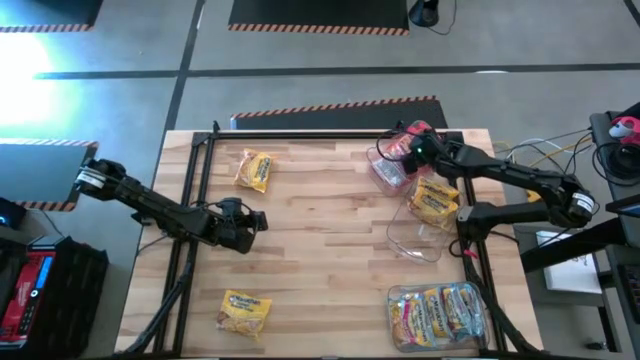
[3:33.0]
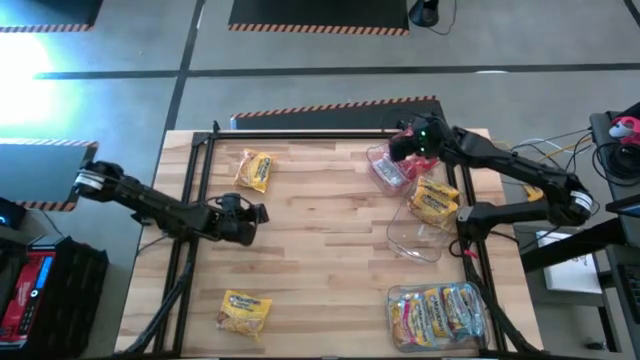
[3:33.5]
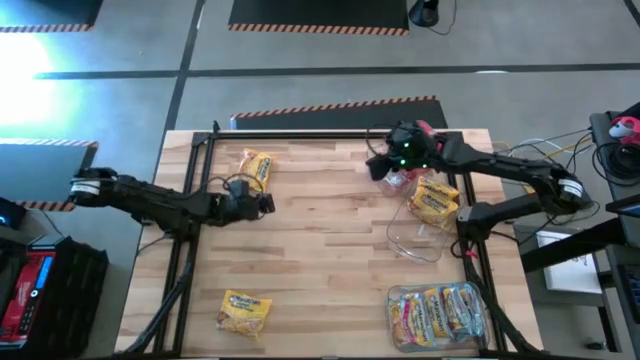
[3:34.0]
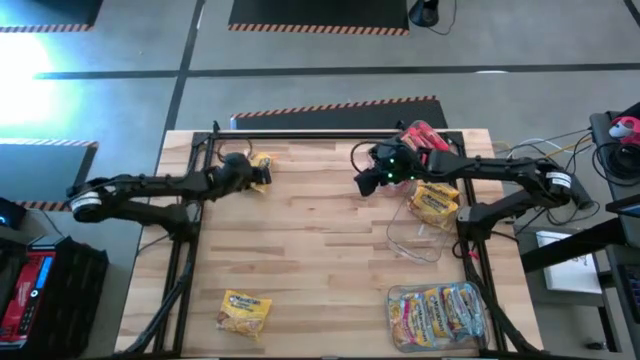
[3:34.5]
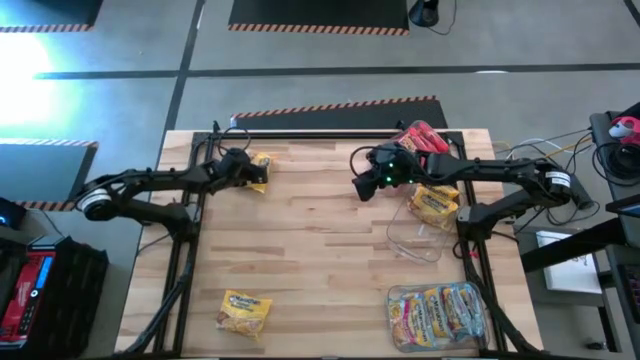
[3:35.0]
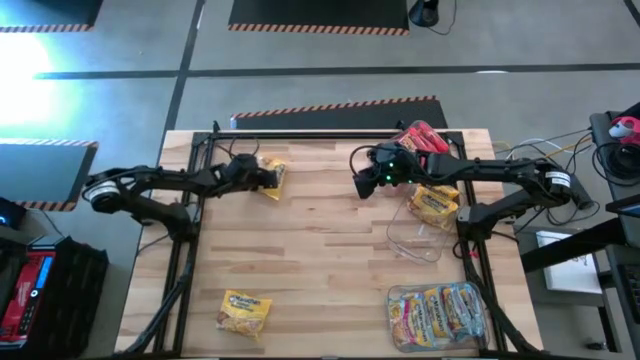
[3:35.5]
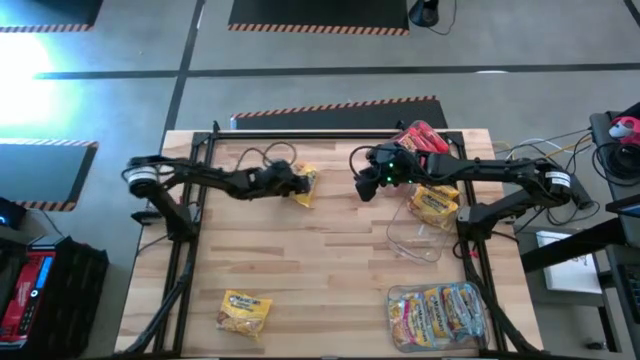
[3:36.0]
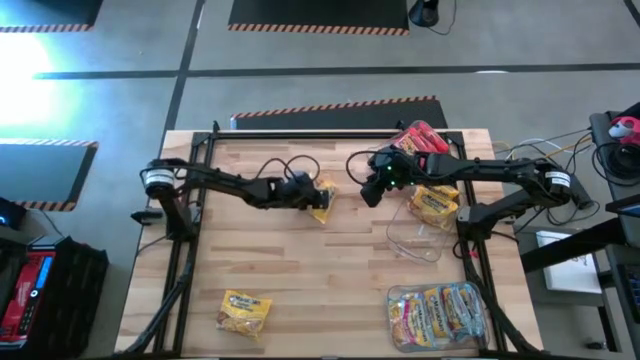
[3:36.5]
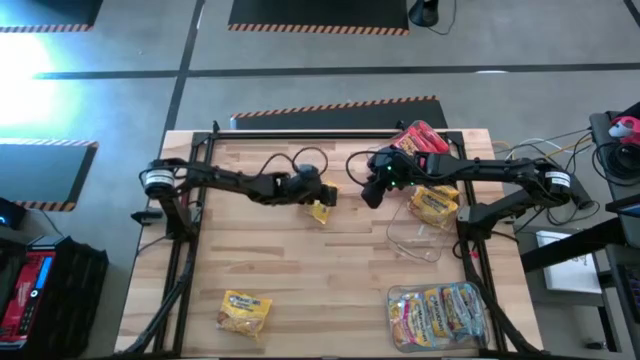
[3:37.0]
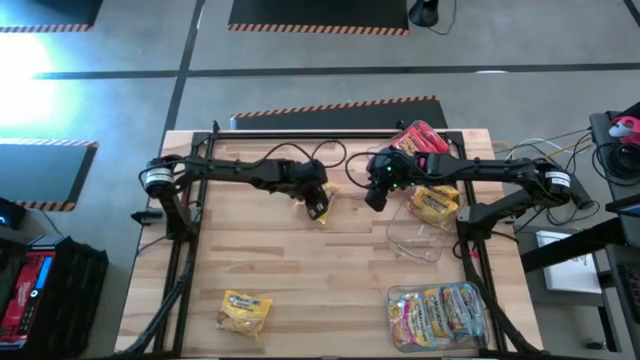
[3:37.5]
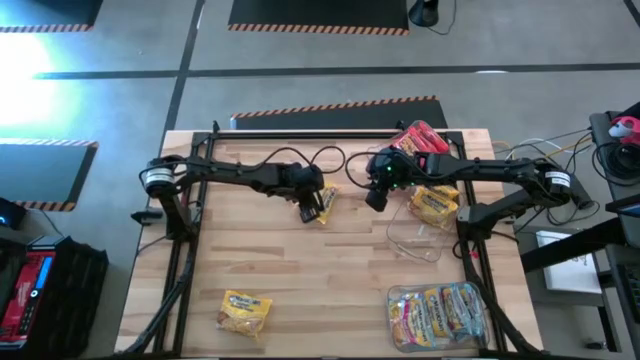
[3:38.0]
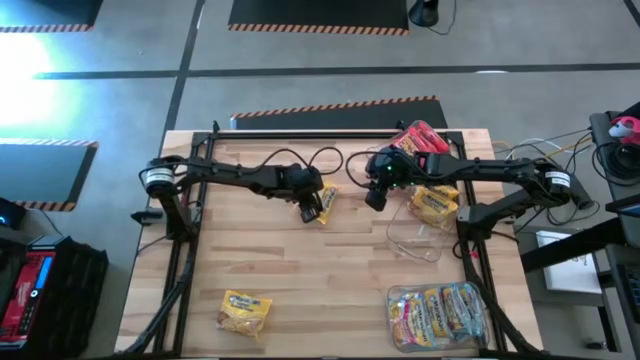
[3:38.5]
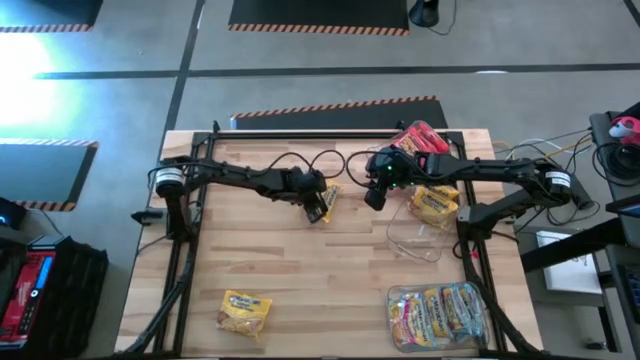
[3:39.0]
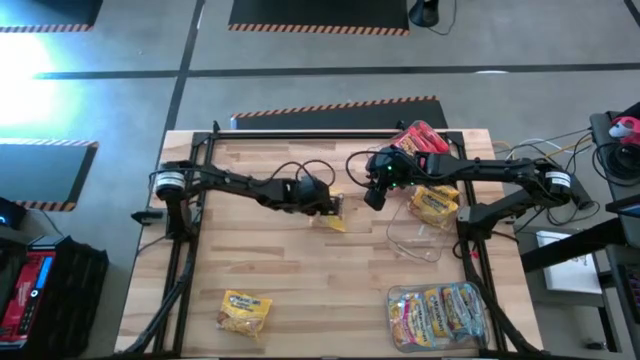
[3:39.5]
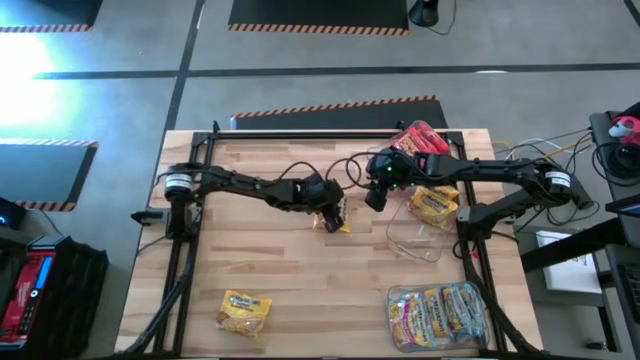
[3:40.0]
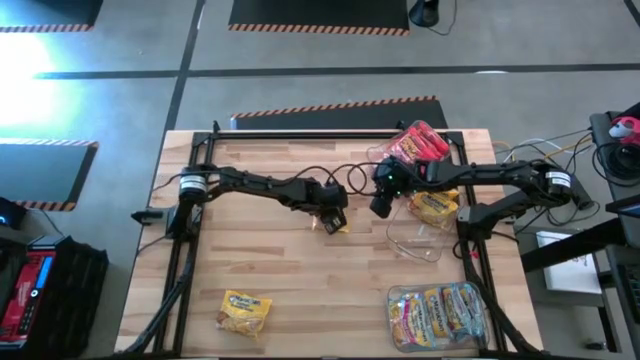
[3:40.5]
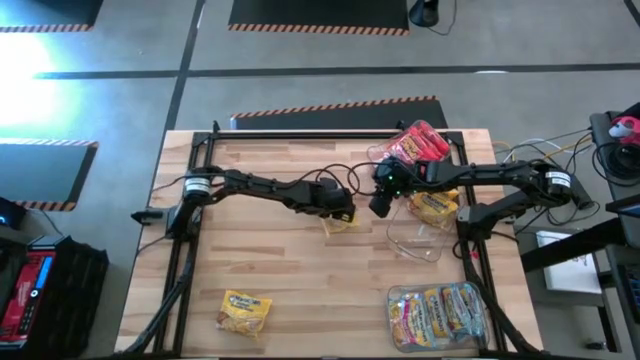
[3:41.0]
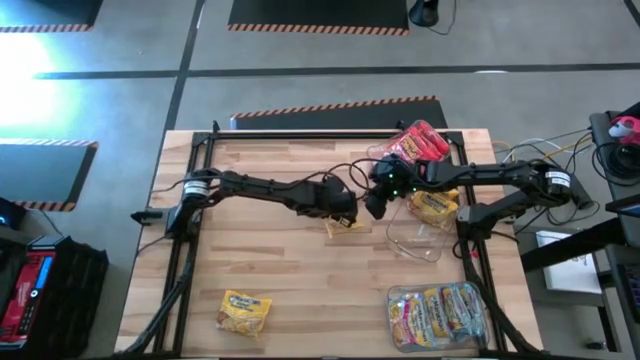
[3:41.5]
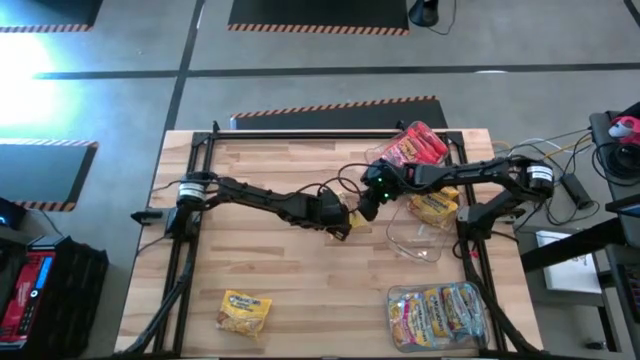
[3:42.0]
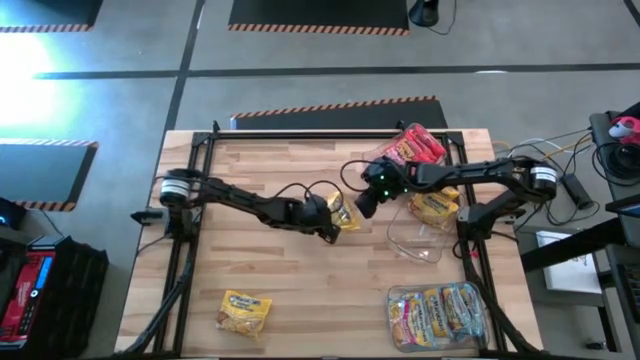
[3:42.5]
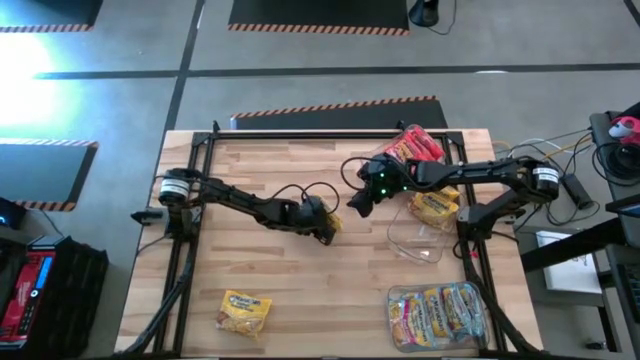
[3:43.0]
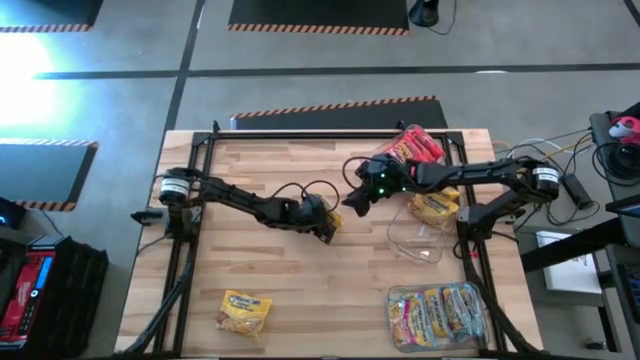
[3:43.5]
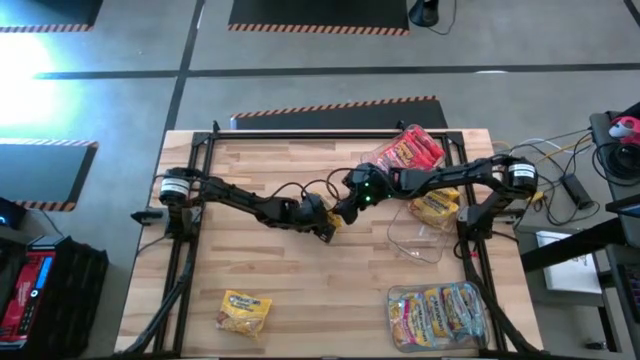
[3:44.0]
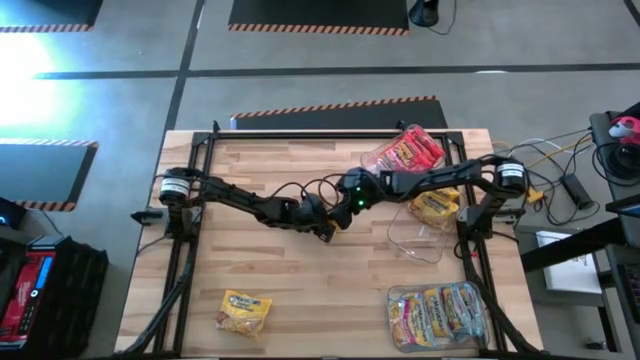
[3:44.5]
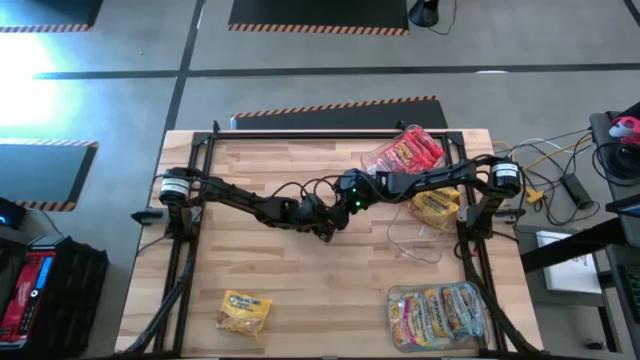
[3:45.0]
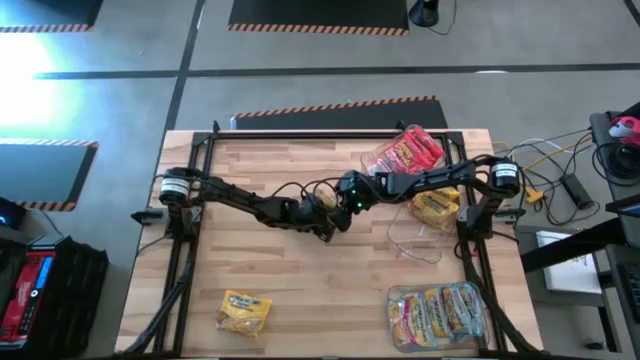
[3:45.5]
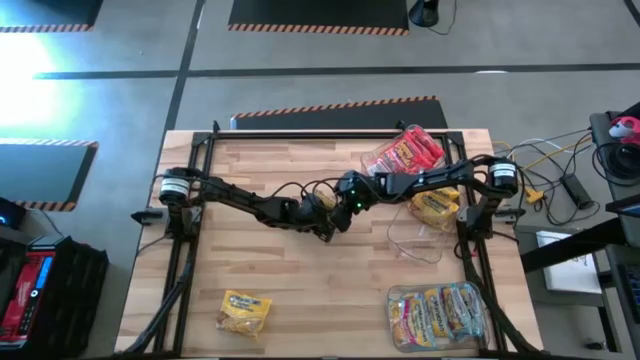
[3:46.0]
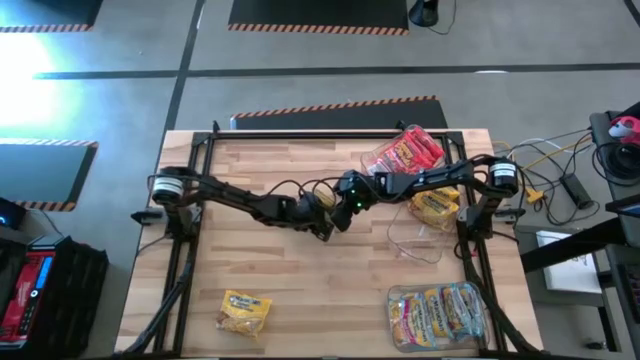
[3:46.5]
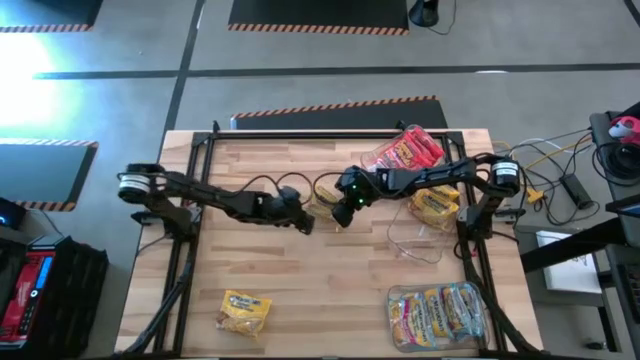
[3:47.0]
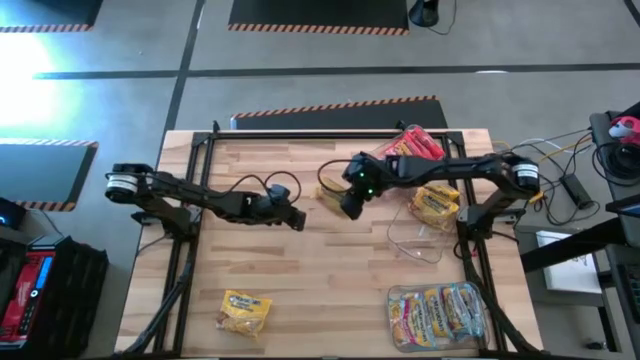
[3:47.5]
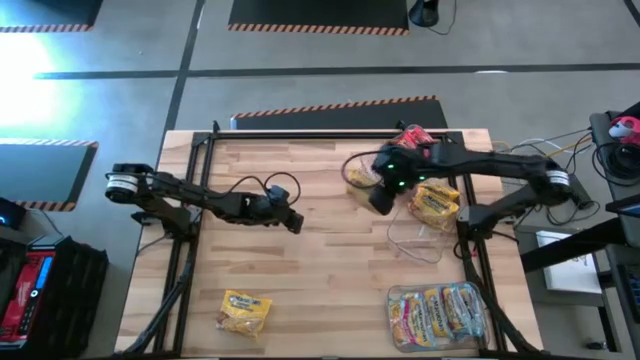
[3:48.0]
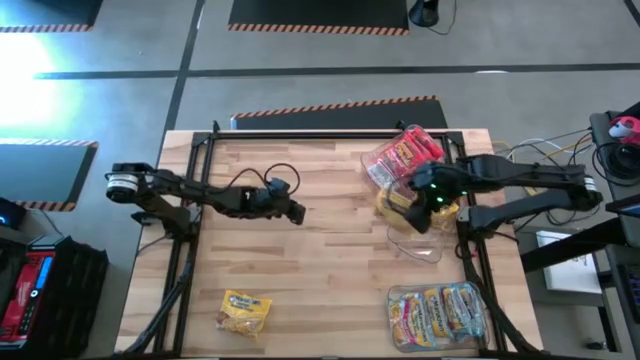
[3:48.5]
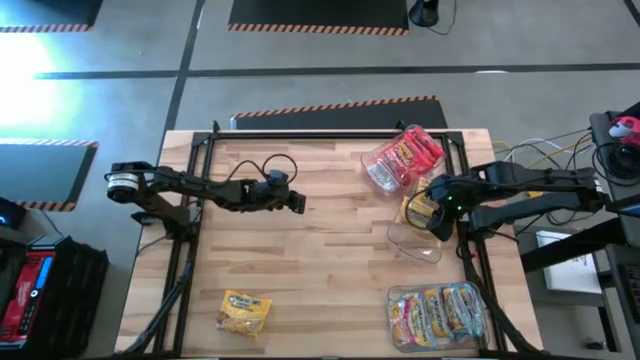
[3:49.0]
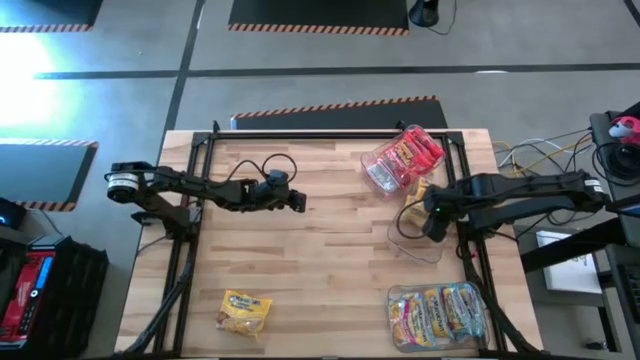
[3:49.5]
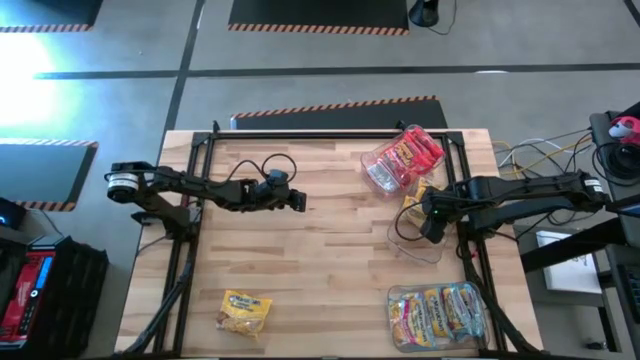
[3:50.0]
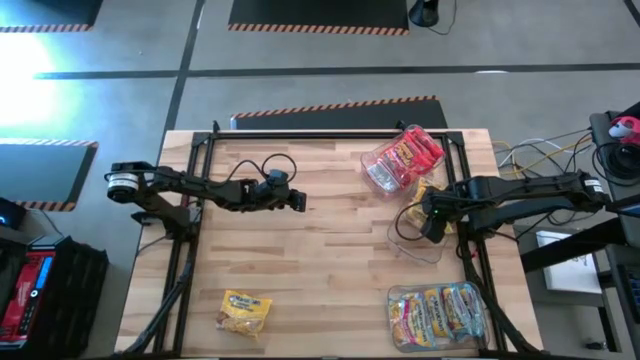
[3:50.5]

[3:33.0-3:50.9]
Task: Sort Maruchan noodles
Put the yellow noodle pack into the middle transparent bin

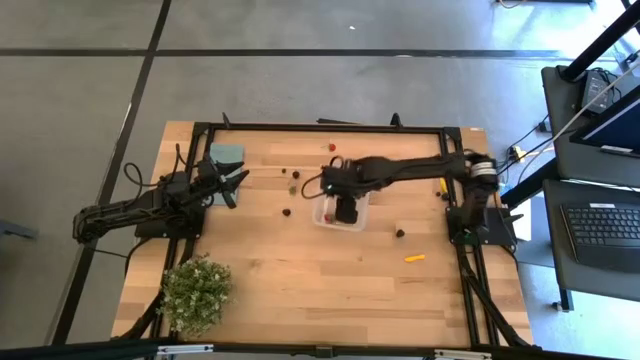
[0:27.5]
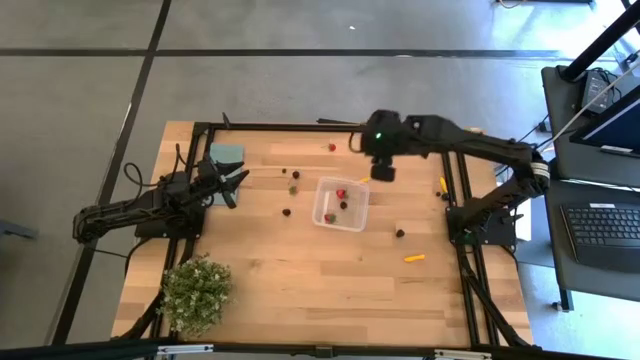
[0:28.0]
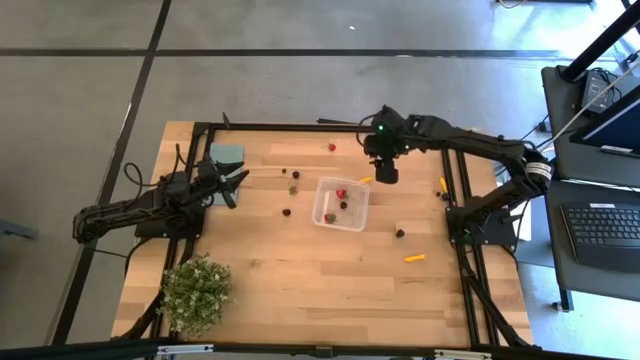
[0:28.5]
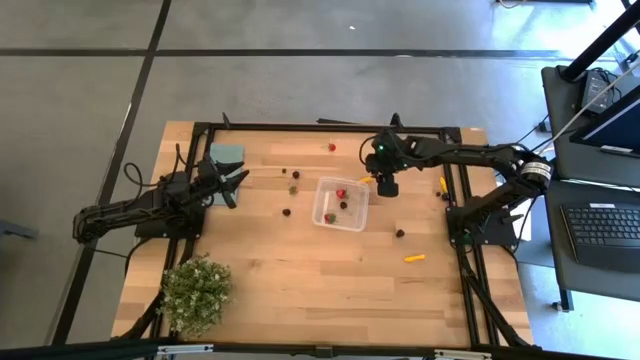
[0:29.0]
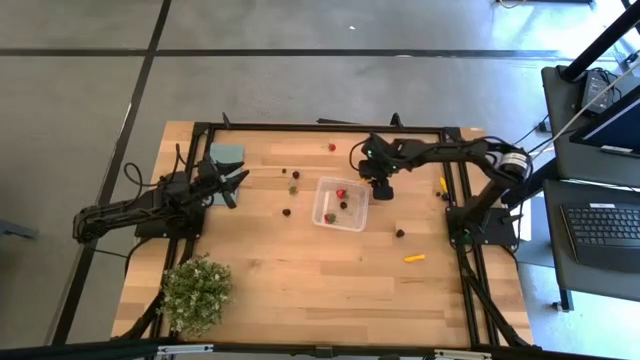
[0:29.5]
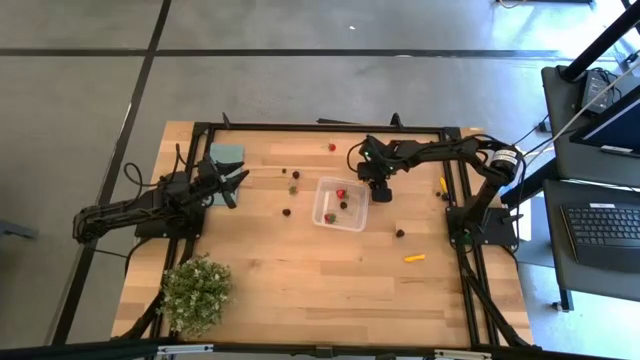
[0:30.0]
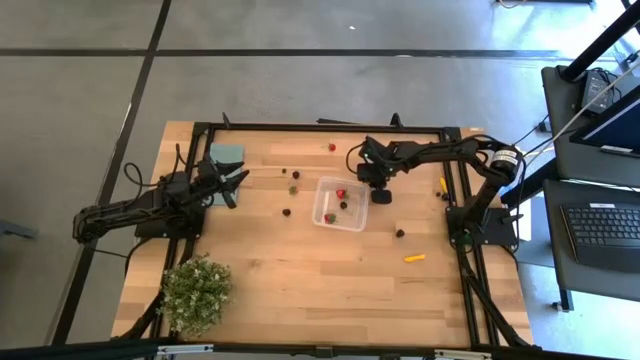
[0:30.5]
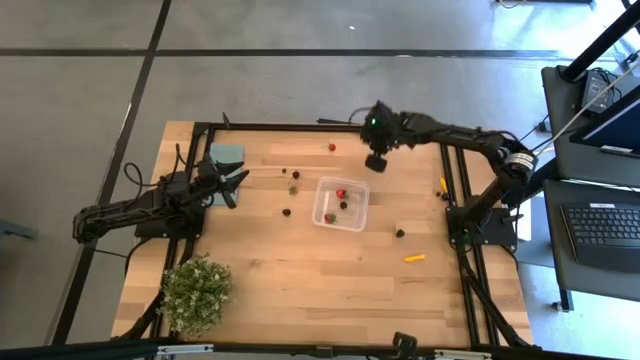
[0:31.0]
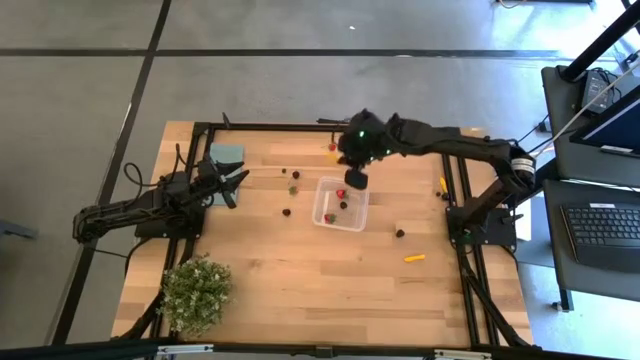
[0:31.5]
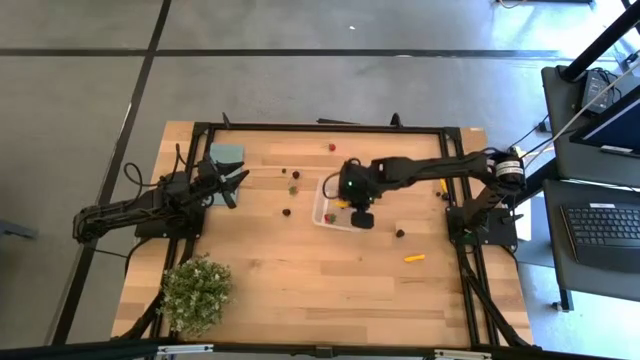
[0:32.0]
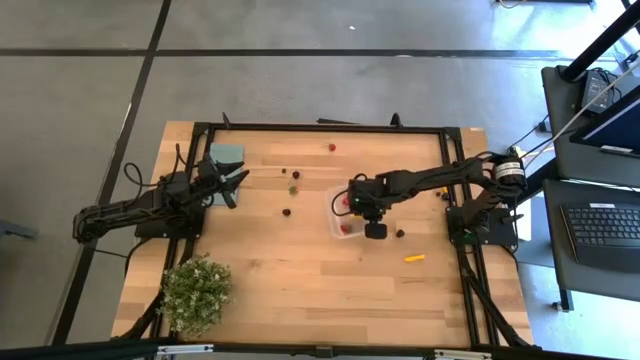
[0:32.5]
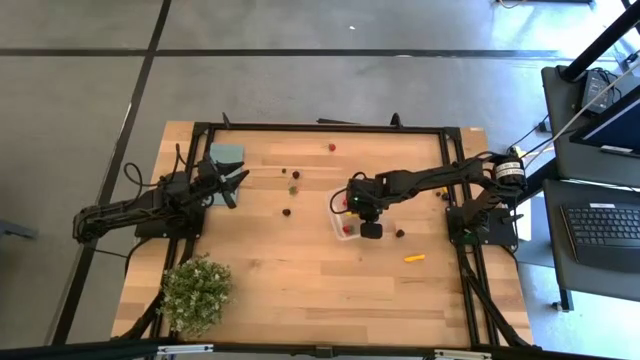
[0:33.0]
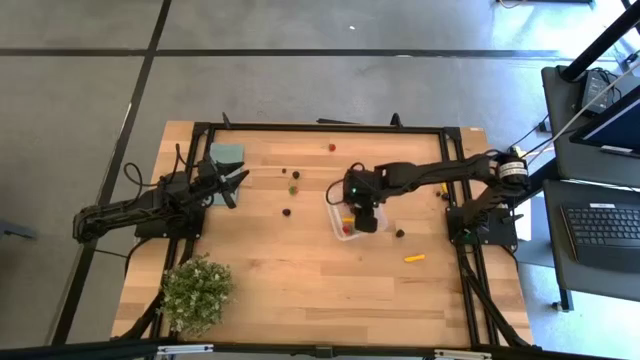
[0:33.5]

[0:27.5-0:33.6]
Task: Pick and placing Produce into tupperware
Put the left corn into the transparent bin
